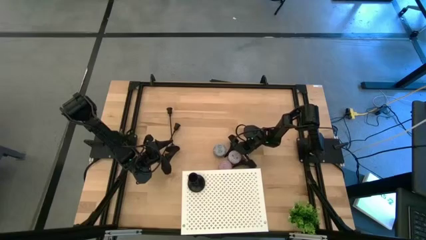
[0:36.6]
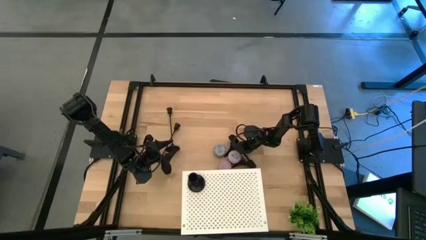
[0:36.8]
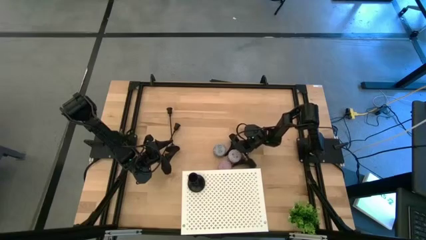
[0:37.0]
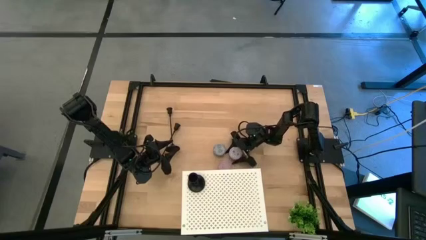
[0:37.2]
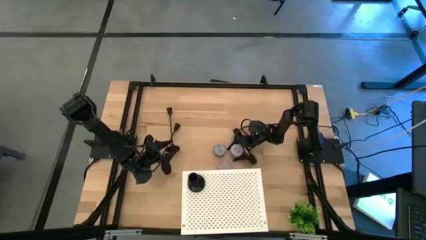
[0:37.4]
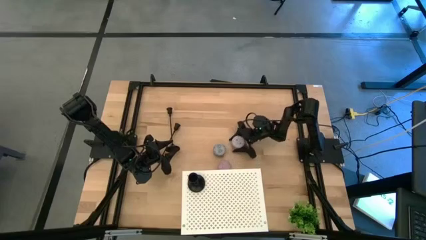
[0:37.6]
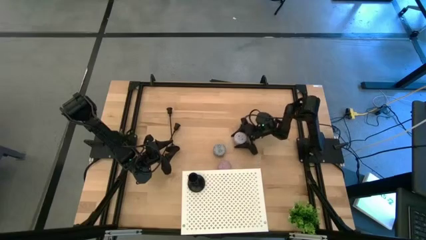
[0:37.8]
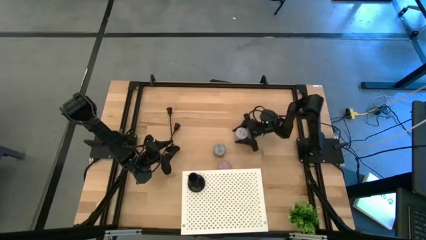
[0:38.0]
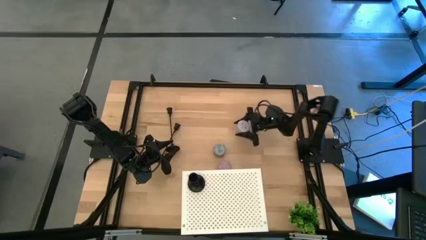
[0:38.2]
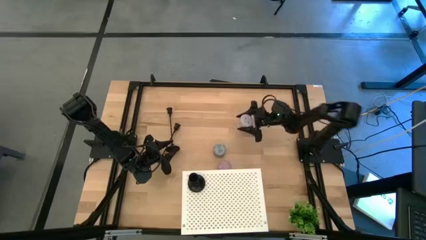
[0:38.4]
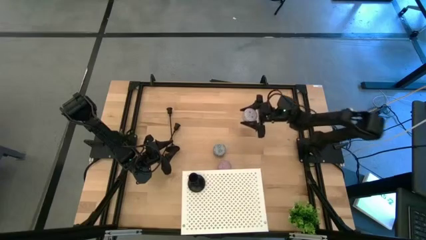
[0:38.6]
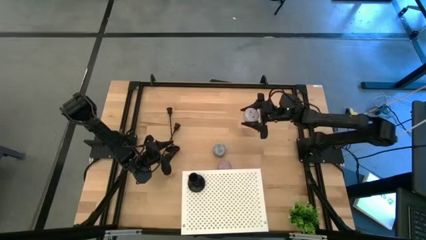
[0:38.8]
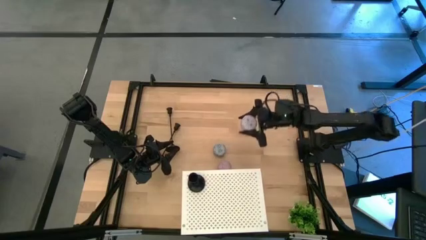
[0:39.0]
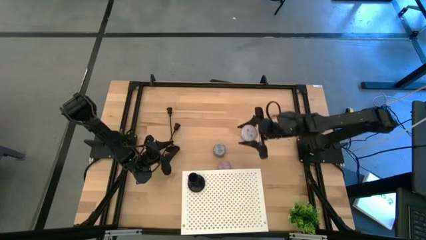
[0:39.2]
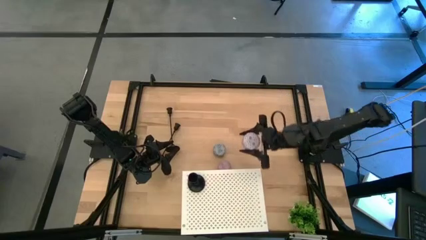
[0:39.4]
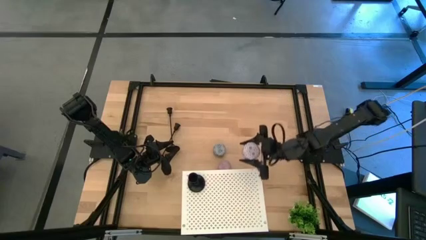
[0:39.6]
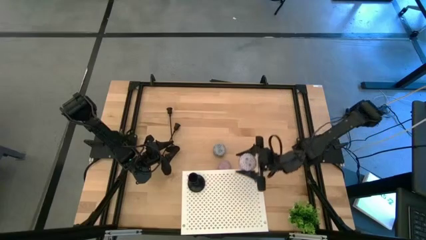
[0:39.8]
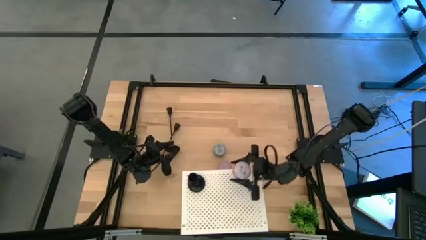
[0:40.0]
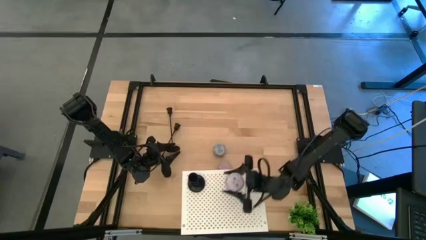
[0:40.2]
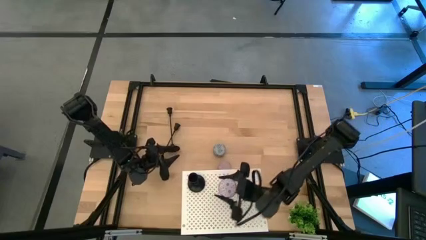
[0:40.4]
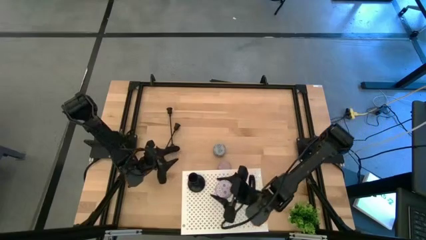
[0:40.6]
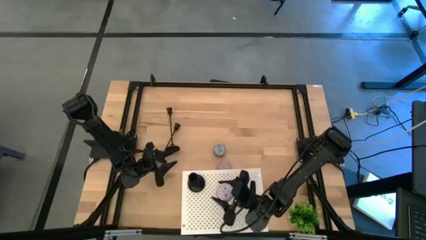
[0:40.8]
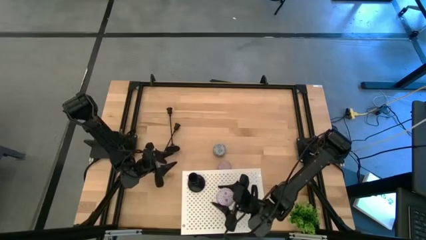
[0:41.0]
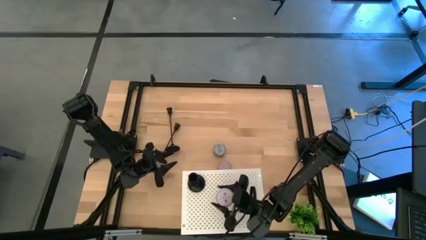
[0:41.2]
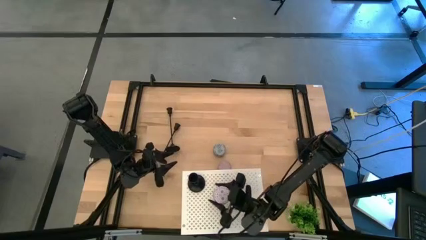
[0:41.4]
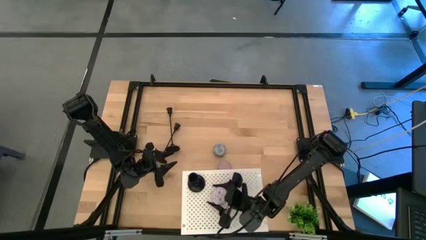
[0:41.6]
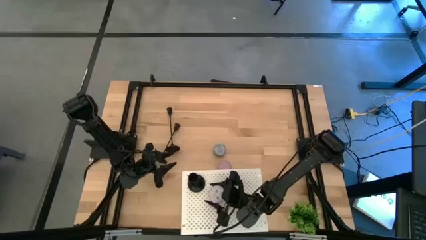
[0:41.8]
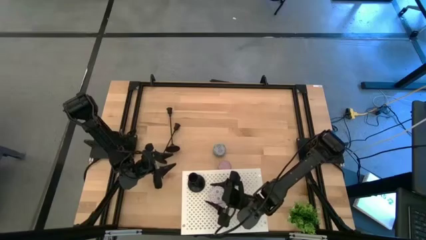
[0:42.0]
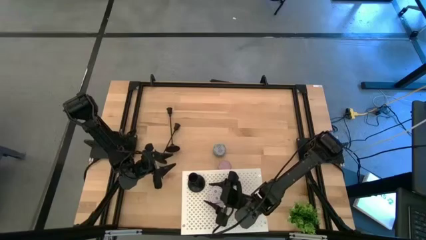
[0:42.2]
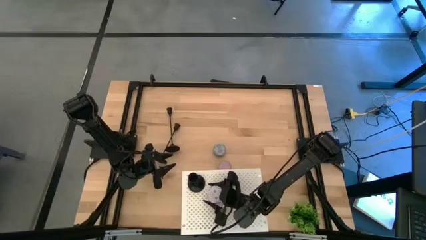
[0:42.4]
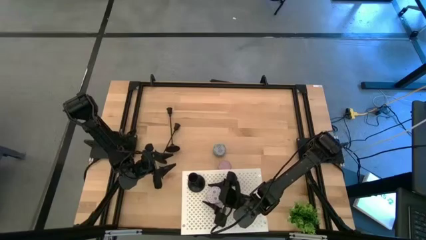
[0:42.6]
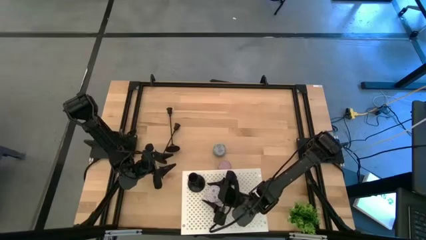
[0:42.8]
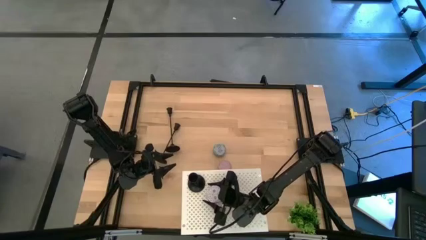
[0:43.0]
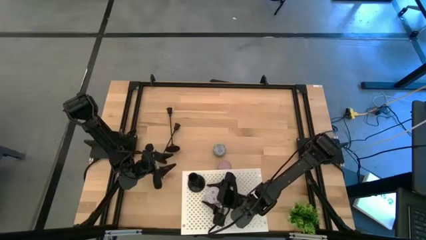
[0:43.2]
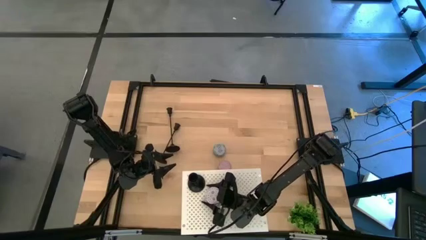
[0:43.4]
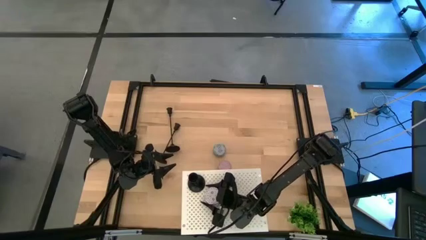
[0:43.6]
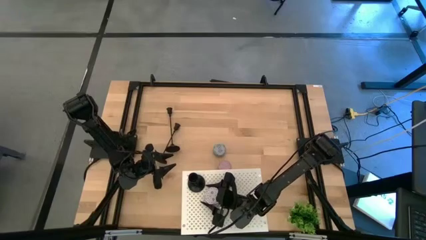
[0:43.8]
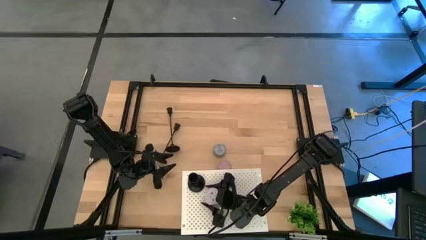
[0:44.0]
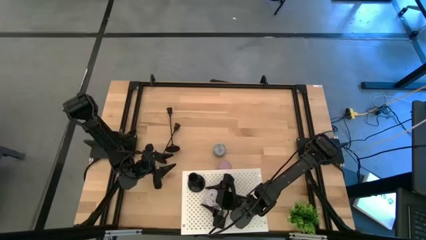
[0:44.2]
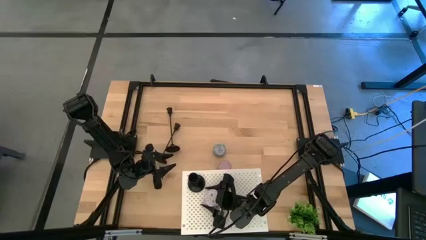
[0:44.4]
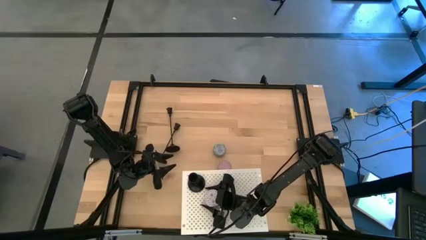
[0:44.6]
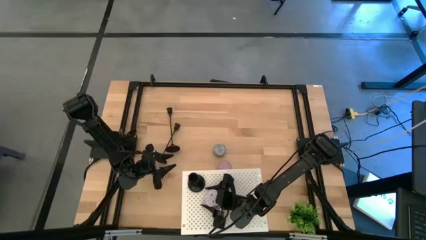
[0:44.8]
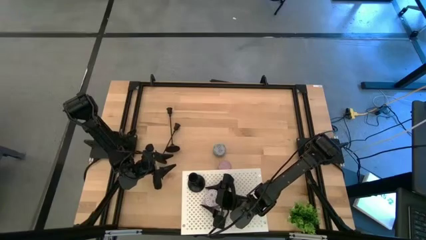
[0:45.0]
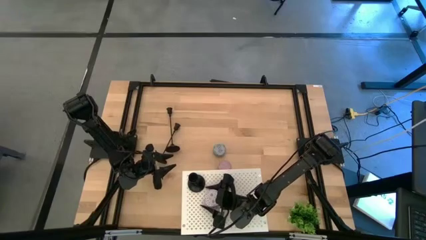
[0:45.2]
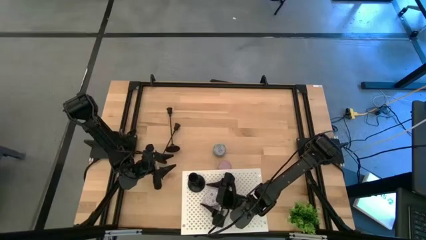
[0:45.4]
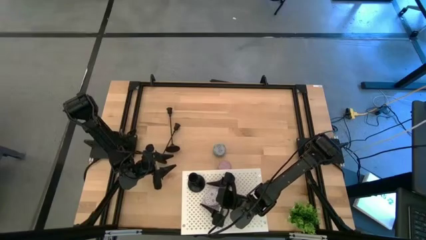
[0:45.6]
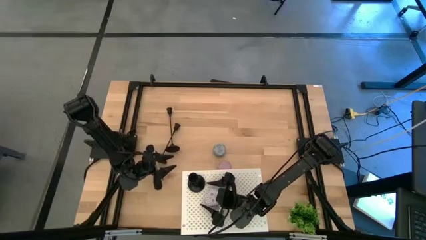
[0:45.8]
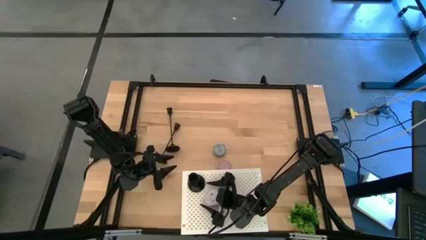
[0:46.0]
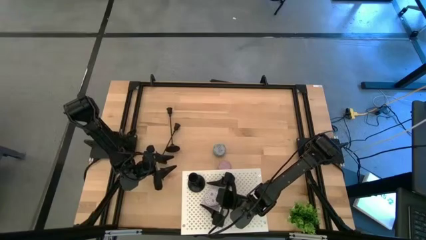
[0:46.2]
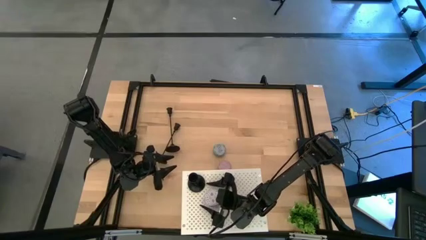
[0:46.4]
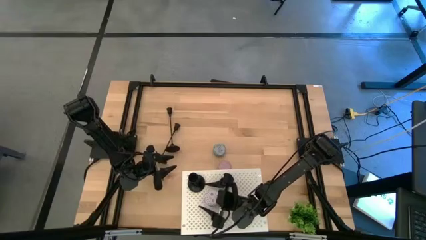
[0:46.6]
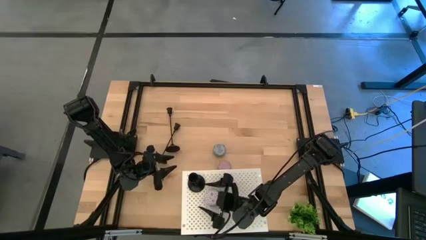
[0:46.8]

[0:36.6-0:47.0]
Task: Pick & Place candle stick holders
Put the right scented candle on the shelf
